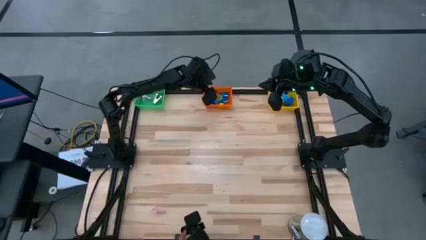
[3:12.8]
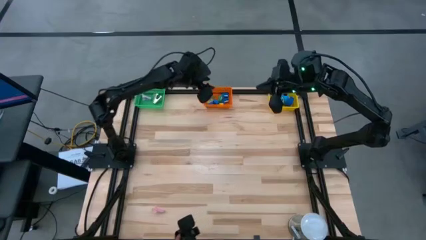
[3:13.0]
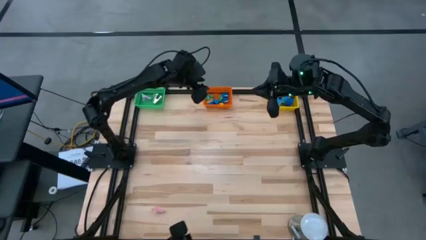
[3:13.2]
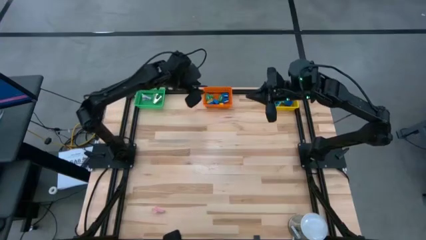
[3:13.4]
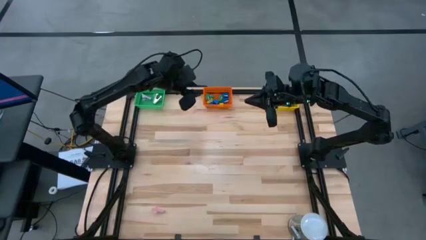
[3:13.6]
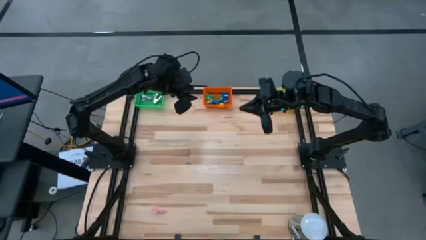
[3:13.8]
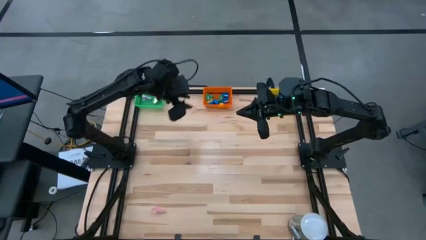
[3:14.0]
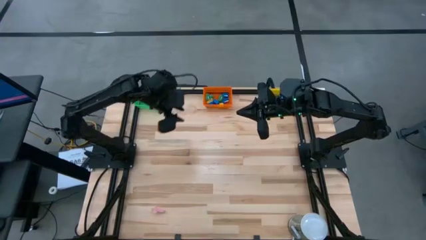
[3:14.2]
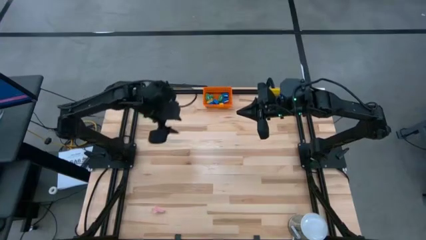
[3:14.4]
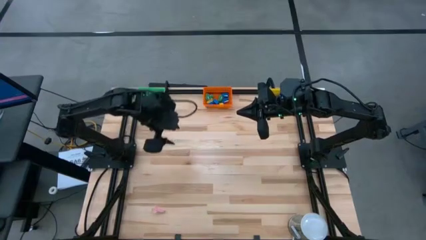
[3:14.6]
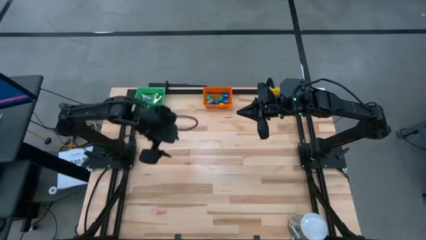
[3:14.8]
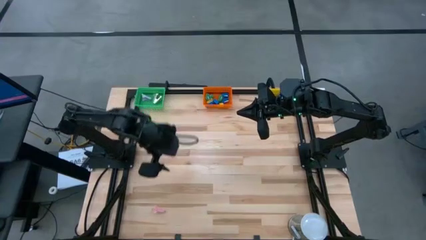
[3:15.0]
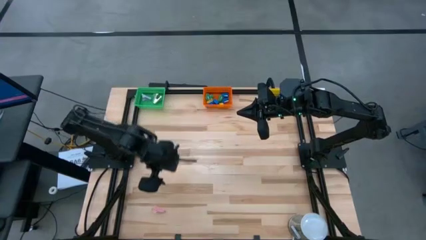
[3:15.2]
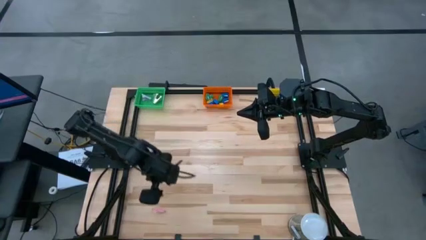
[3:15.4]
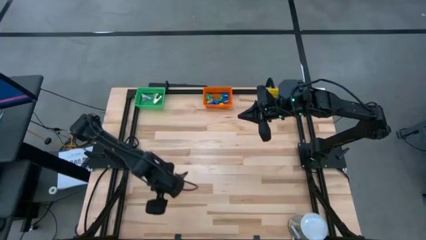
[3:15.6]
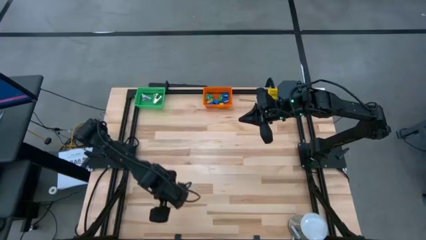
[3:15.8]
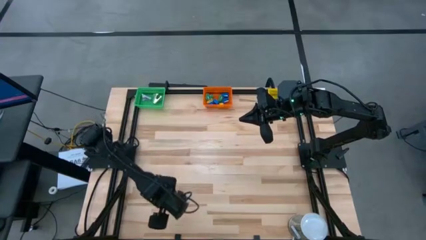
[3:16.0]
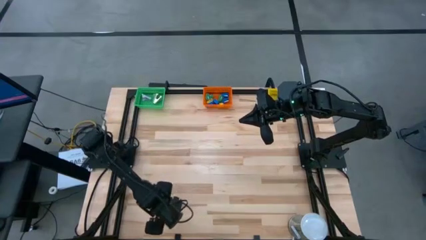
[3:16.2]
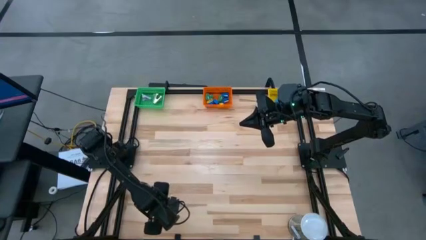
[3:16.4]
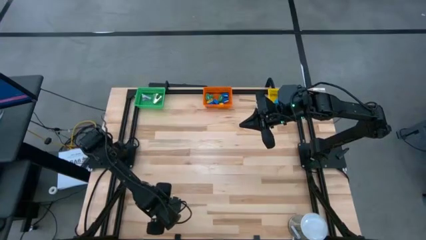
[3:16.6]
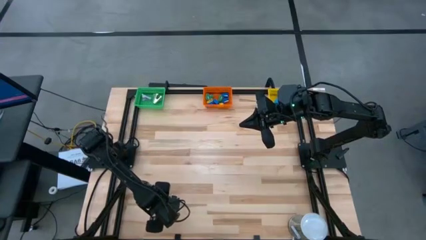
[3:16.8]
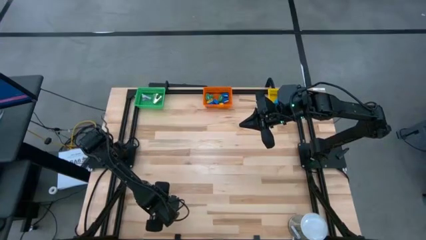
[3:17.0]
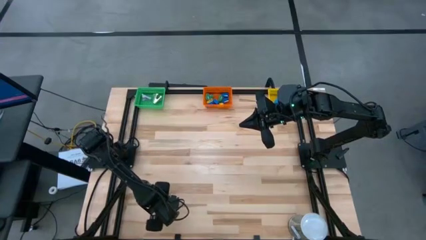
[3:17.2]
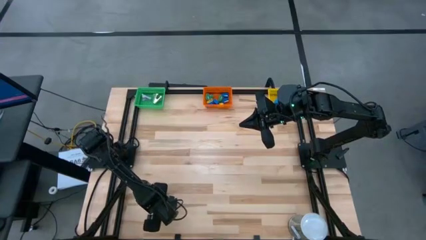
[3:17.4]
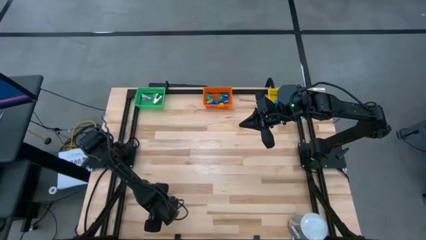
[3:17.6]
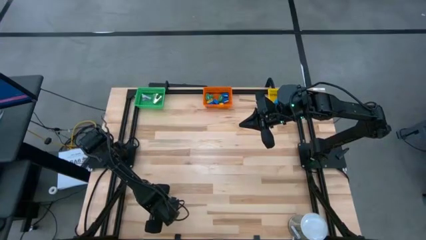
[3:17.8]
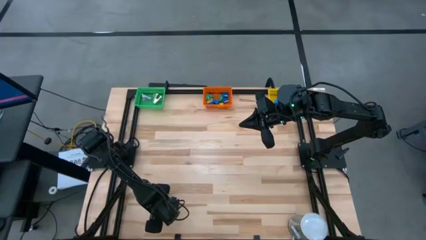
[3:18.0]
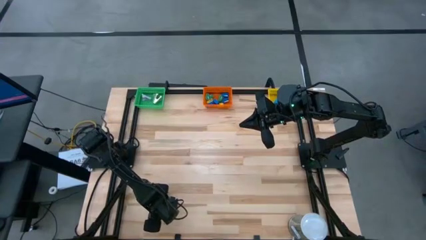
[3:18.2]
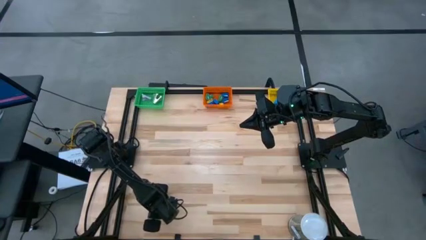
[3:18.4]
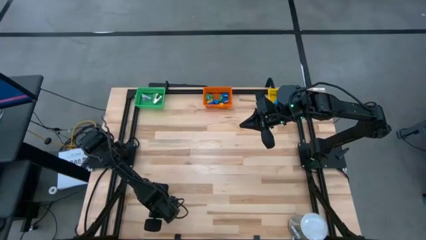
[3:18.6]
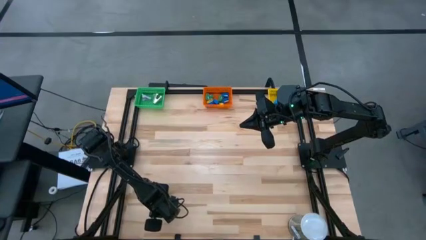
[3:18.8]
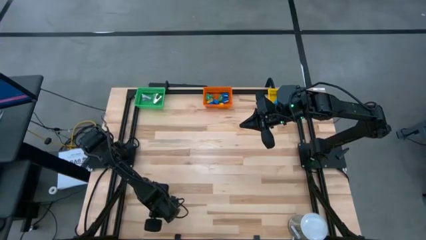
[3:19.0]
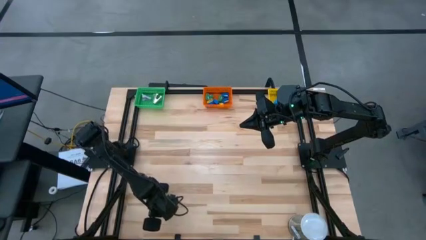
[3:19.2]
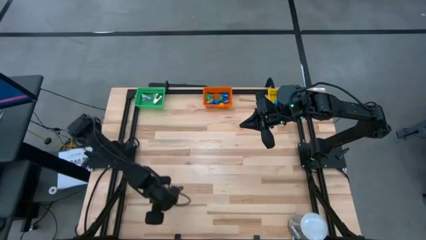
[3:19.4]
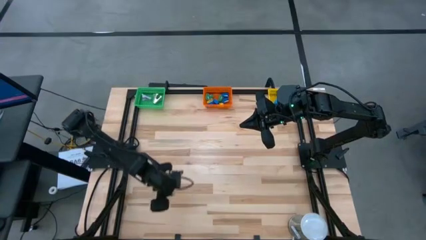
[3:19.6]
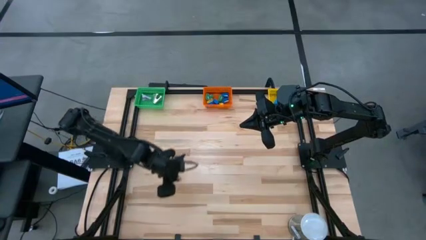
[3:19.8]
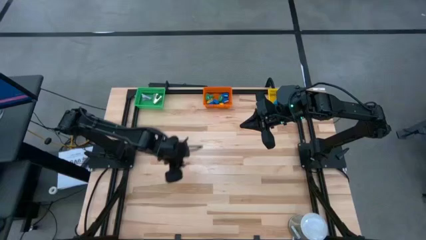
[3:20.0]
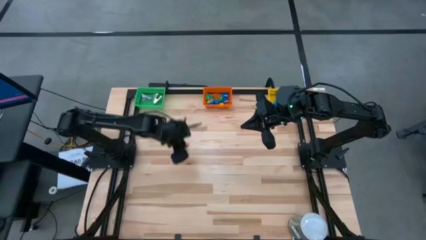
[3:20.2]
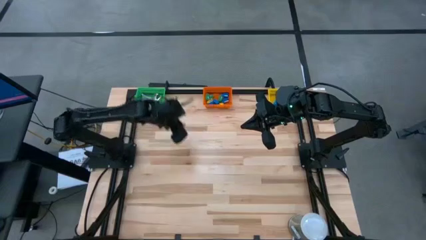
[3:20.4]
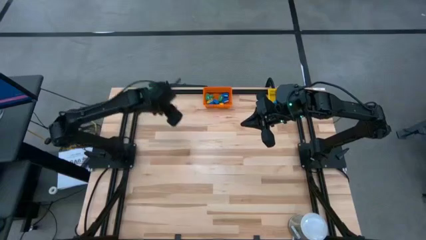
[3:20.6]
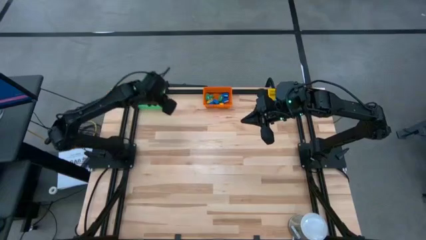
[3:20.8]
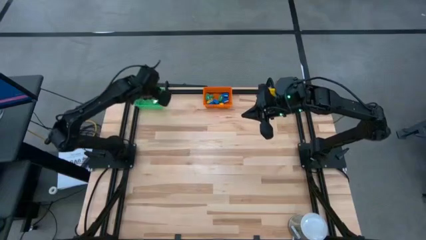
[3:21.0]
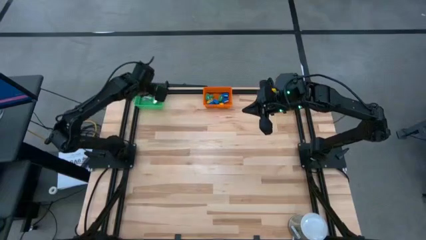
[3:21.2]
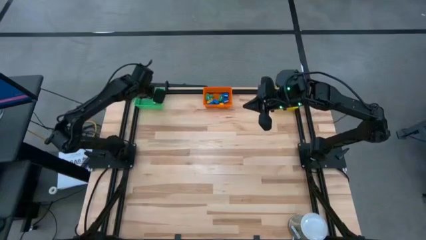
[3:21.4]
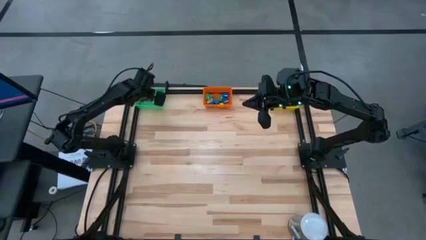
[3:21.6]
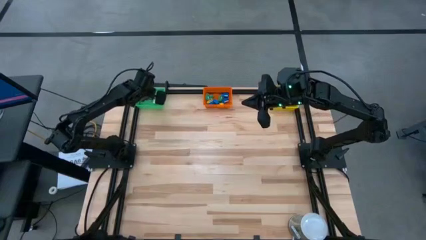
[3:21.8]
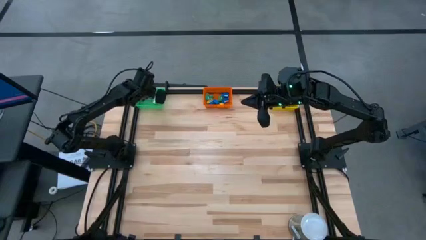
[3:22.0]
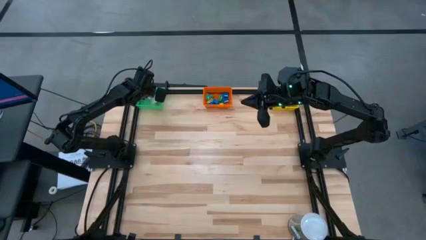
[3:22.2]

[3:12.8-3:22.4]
Task: Pick and place Stapler, Stapler remover, tape
Put the pink staple remover into the green bin

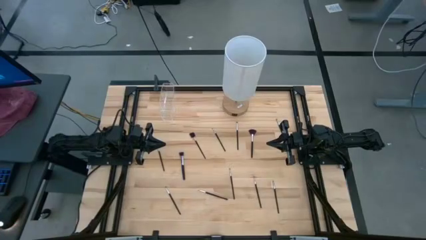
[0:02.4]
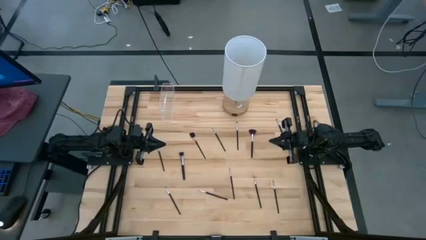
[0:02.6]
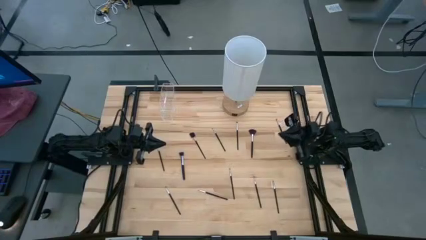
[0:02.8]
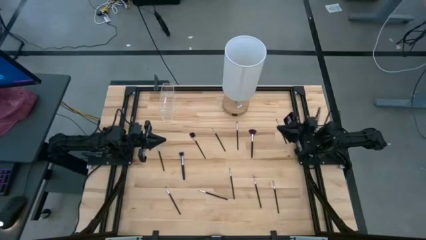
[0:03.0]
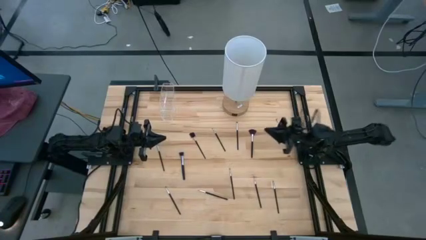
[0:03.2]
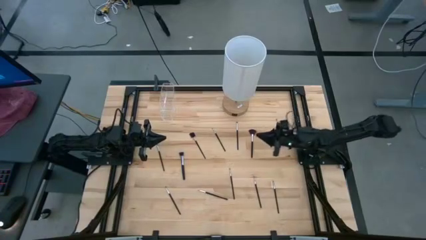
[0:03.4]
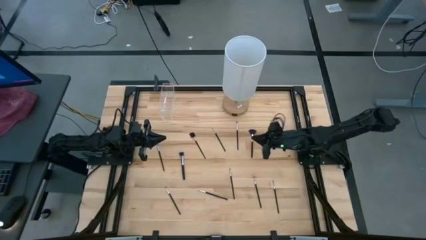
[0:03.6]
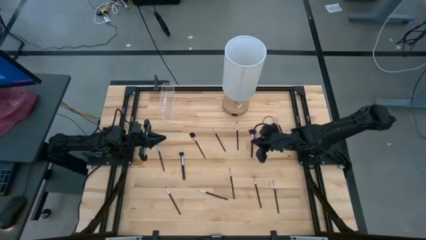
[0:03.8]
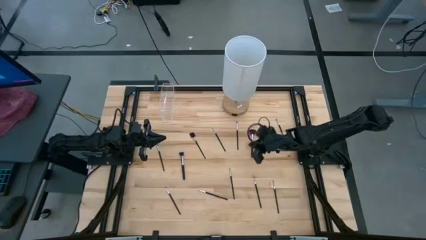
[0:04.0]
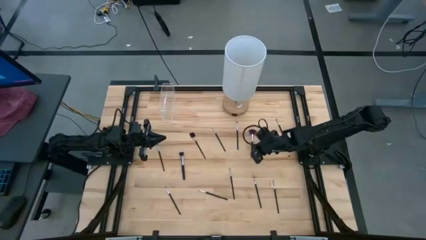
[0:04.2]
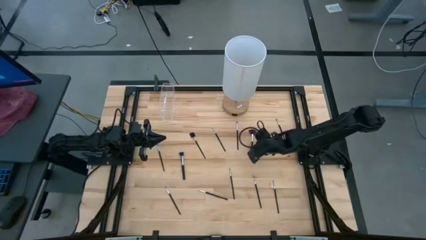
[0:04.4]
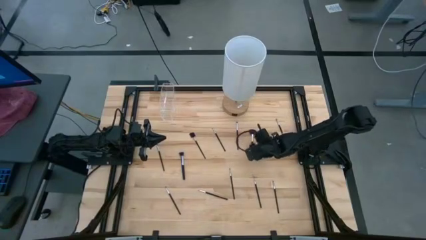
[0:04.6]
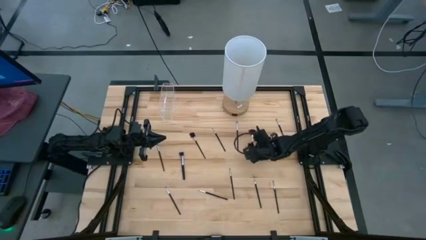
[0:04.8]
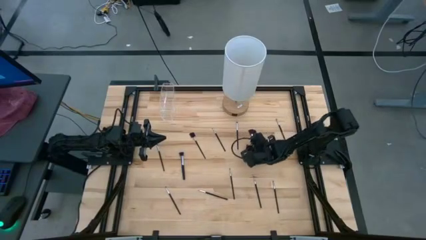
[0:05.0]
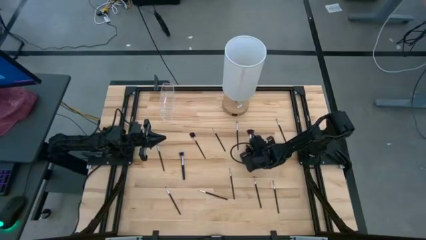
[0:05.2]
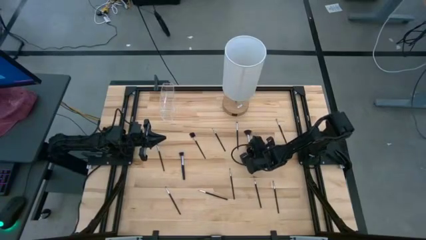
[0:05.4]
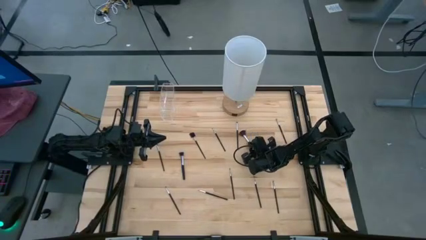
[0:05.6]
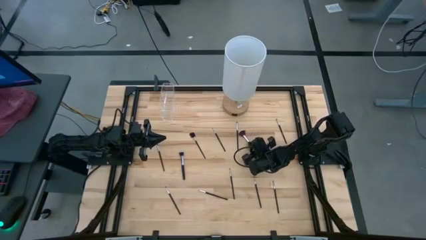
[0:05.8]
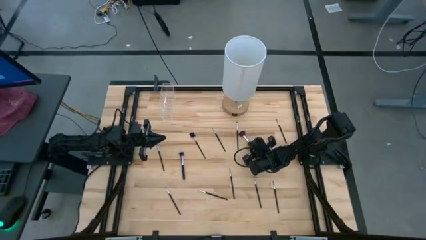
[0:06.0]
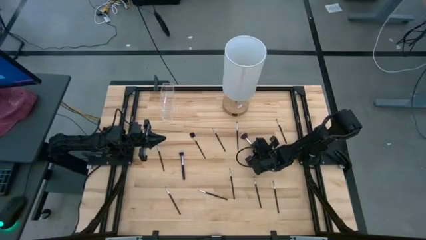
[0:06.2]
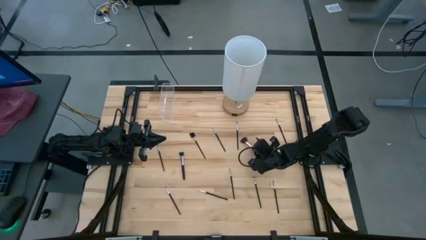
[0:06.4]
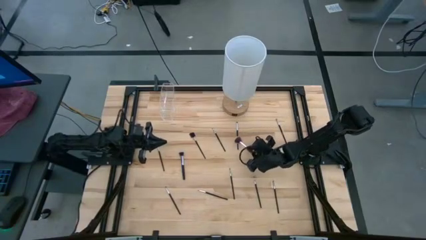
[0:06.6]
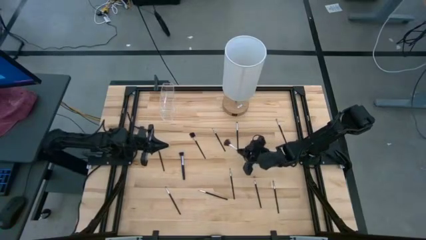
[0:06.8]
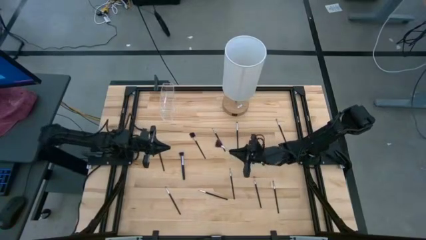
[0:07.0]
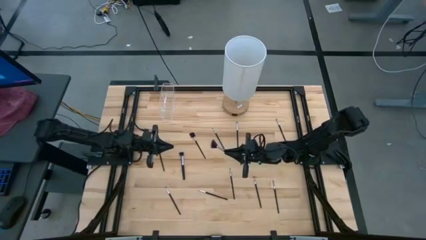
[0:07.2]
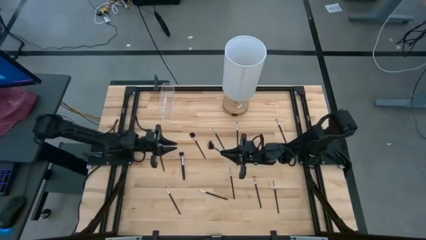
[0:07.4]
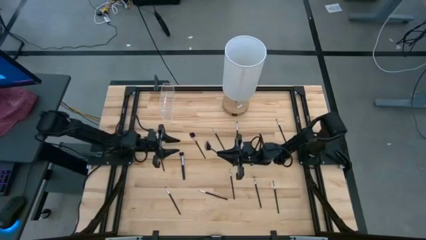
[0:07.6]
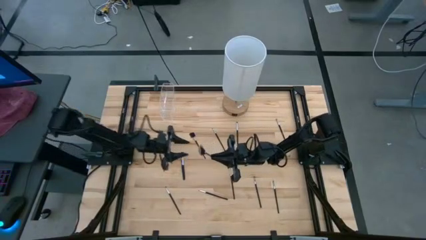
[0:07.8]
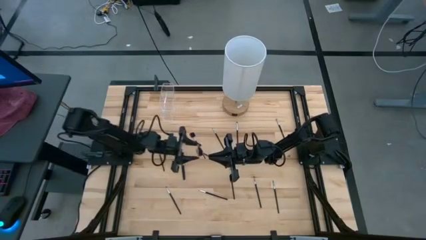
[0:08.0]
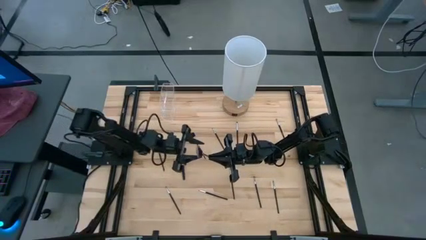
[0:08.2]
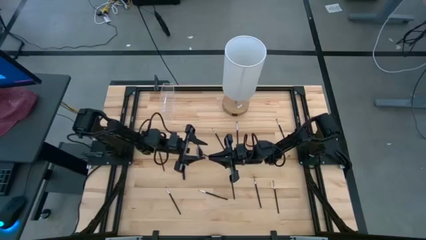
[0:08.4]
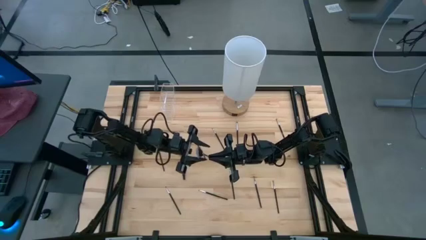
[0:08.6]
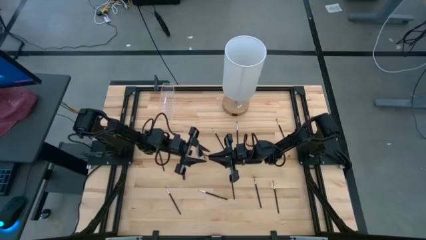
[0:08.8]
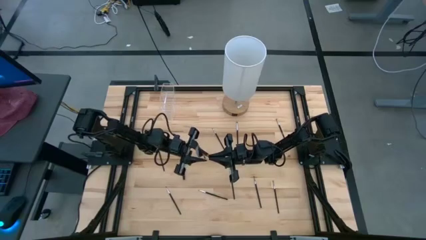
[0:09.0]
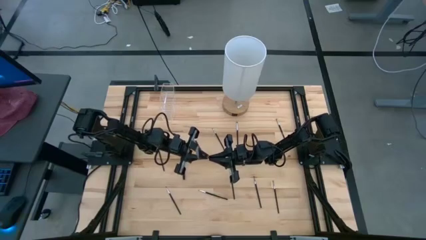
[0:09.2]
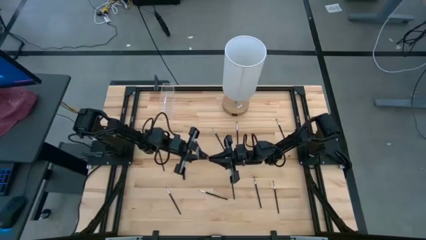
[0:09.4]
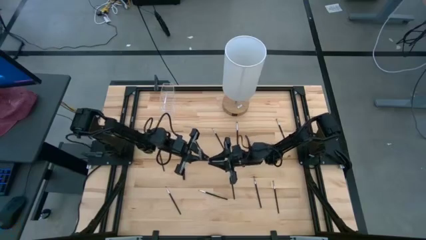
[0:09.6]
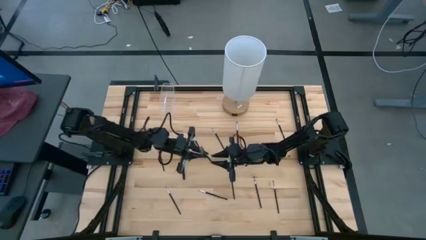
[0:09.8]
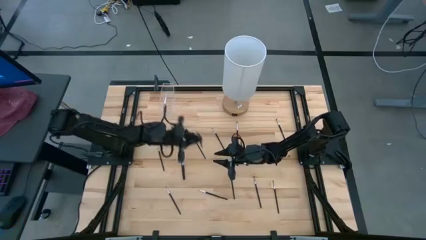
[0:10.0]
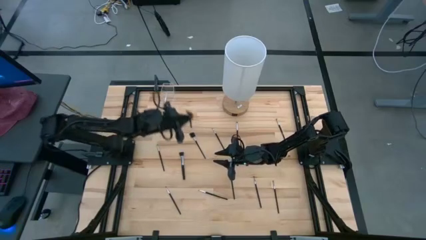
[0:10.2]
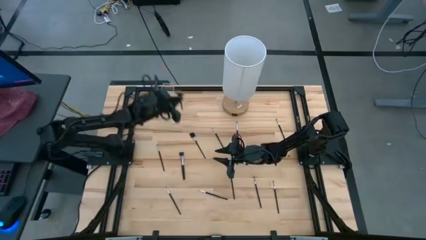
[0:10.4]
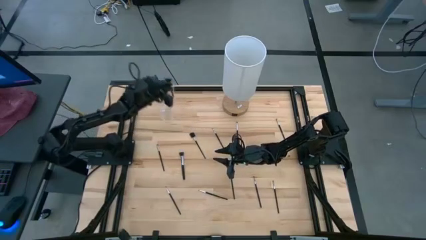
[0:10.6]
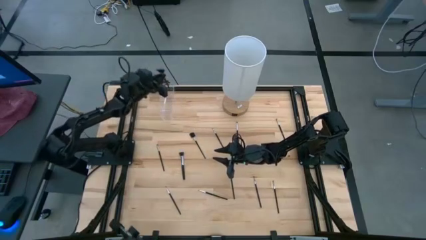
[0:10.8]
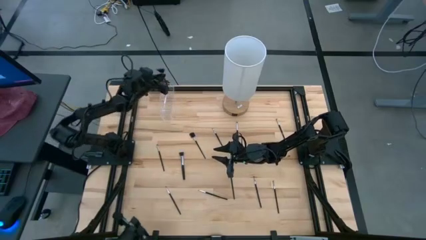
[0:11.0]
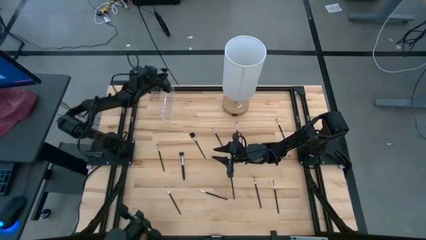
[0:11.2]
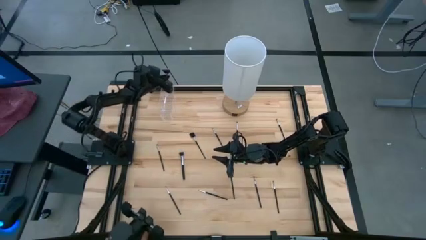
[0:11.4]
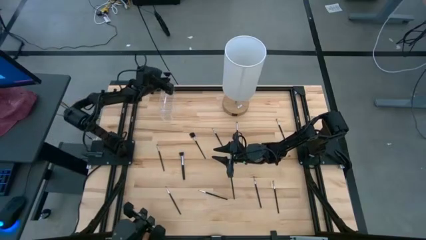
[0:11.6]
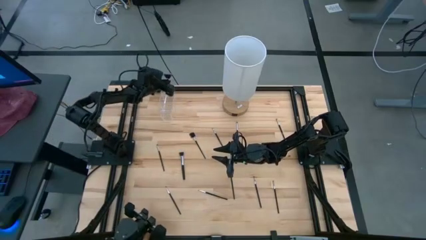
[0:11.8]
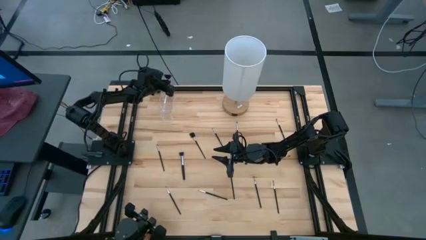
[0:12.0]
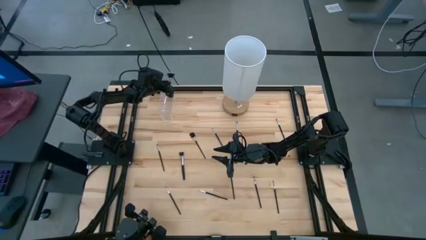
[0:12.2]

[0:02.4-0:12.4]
Task: Put items in baskets/containers
Put the black highlighter brush into the transparent organizer
